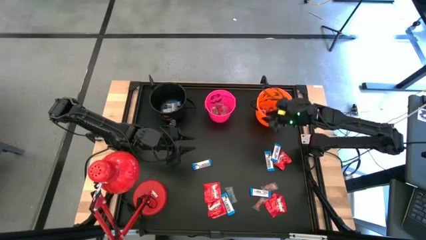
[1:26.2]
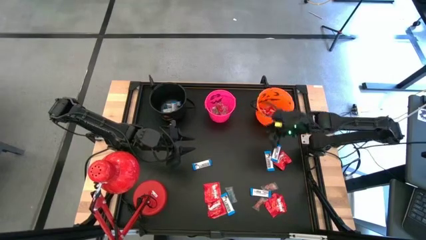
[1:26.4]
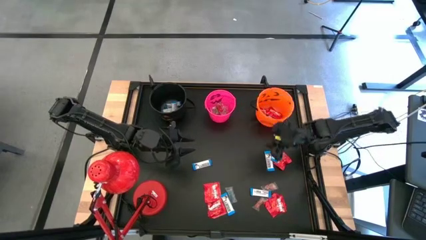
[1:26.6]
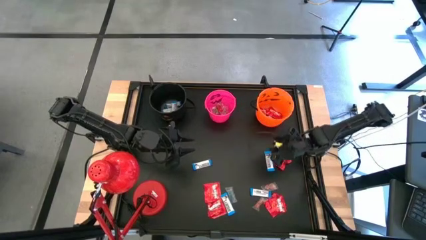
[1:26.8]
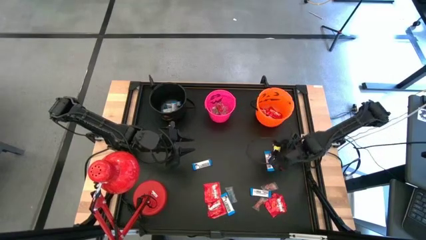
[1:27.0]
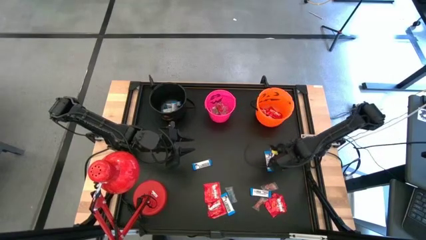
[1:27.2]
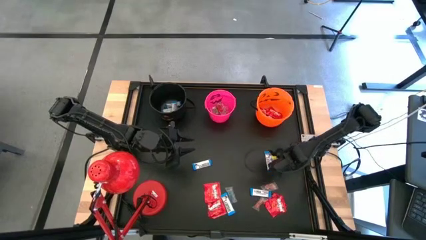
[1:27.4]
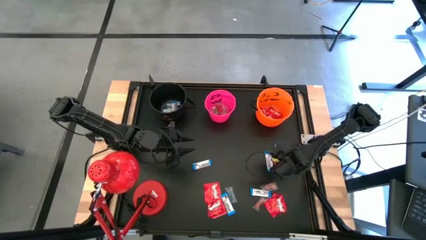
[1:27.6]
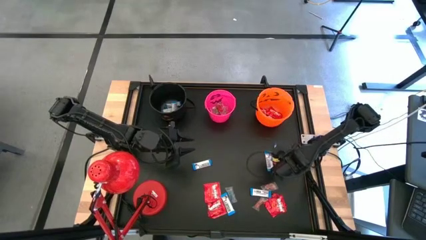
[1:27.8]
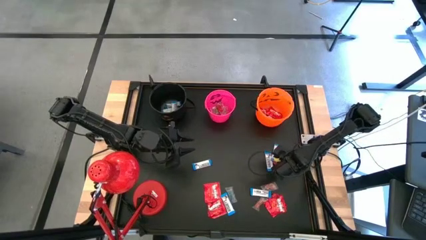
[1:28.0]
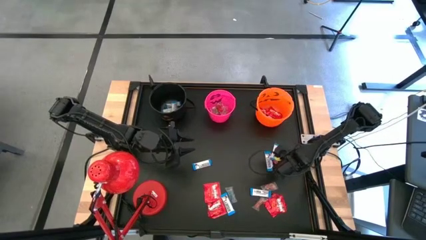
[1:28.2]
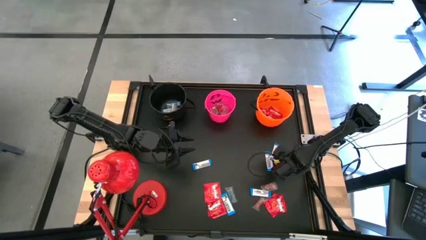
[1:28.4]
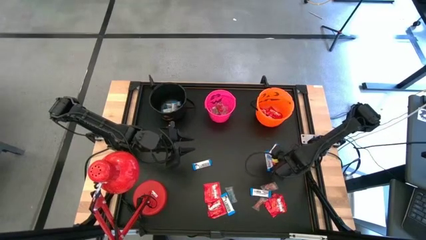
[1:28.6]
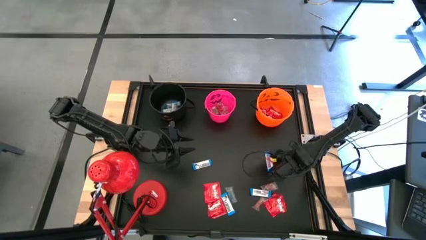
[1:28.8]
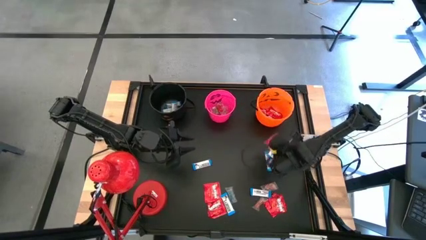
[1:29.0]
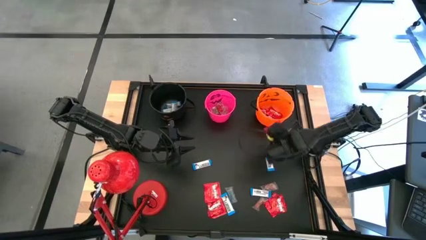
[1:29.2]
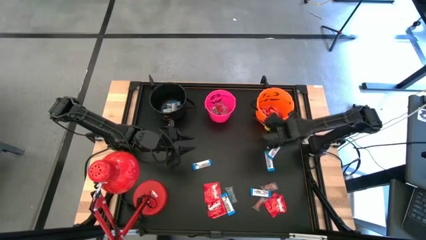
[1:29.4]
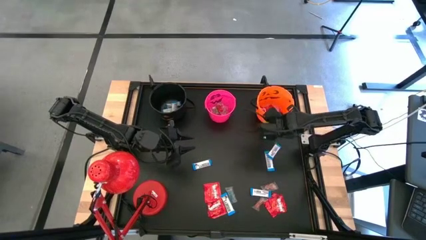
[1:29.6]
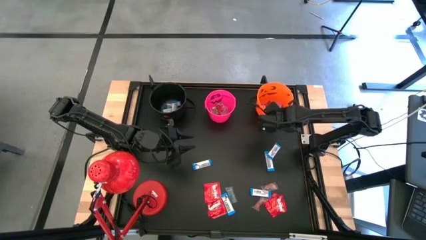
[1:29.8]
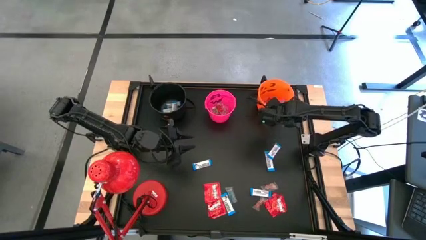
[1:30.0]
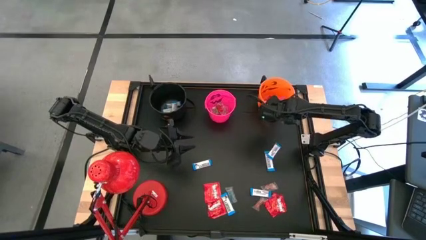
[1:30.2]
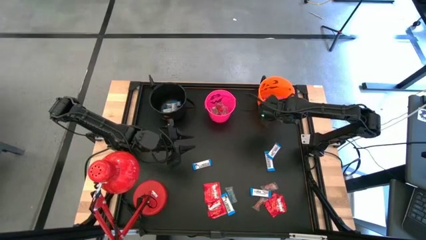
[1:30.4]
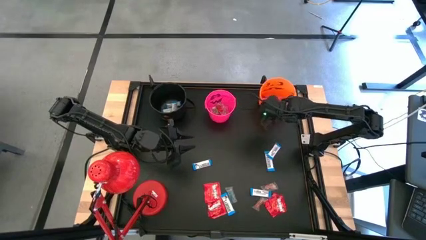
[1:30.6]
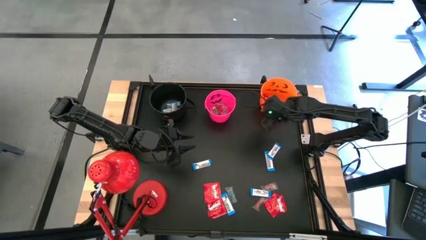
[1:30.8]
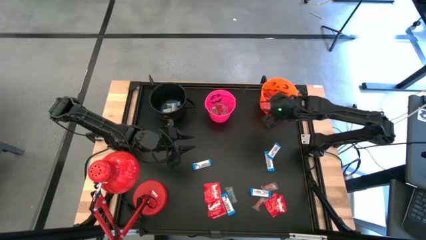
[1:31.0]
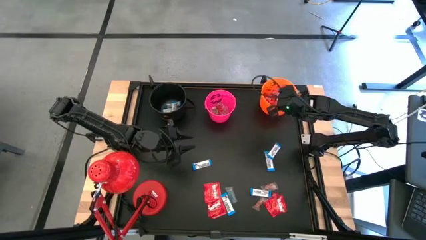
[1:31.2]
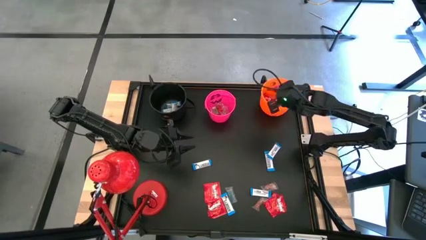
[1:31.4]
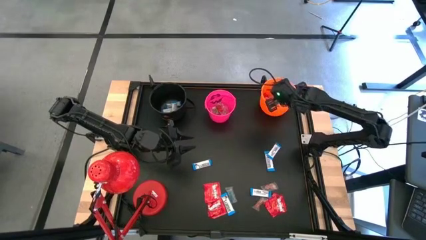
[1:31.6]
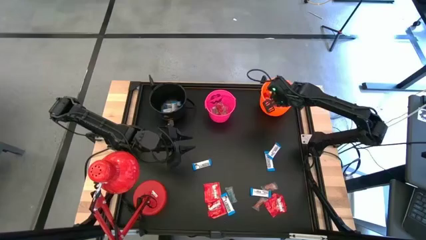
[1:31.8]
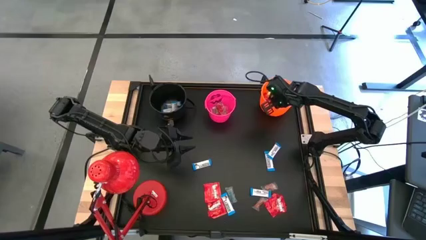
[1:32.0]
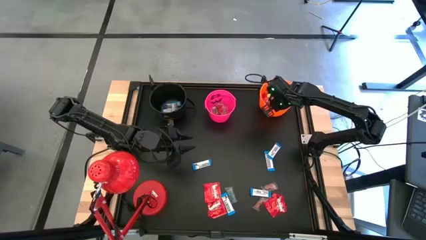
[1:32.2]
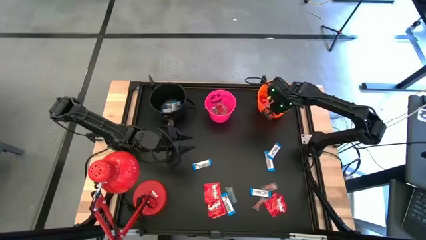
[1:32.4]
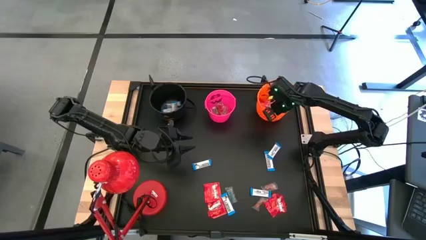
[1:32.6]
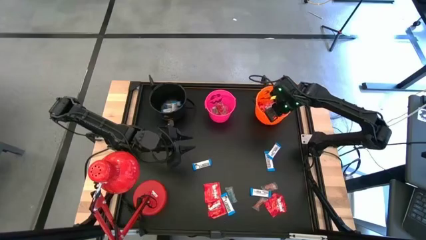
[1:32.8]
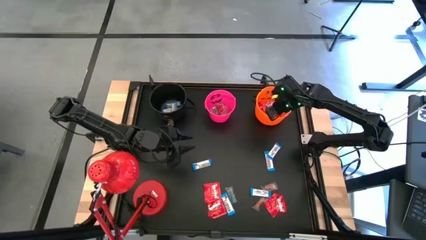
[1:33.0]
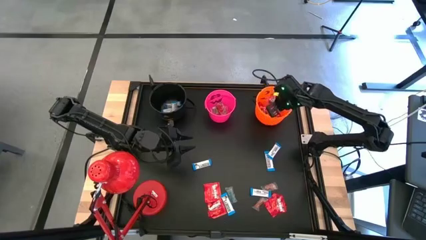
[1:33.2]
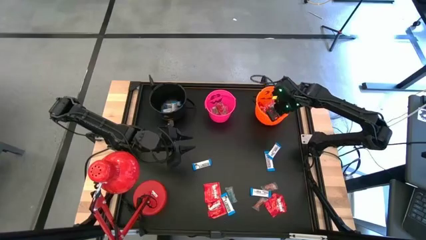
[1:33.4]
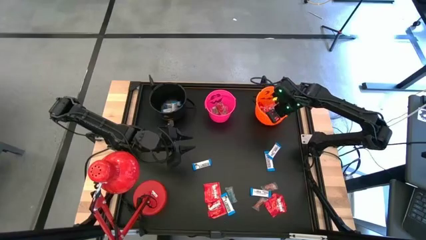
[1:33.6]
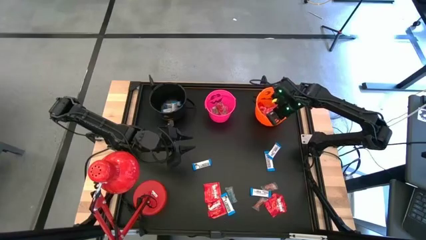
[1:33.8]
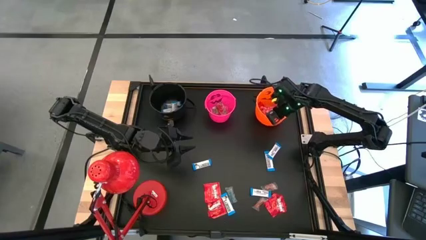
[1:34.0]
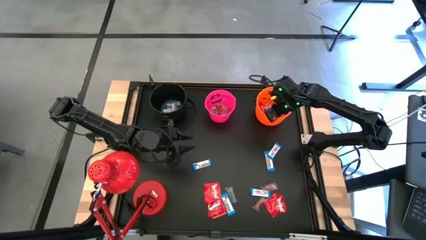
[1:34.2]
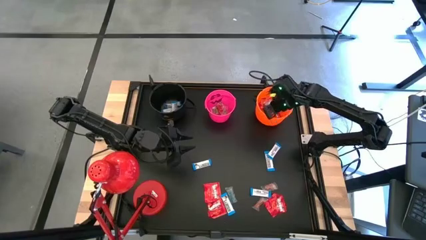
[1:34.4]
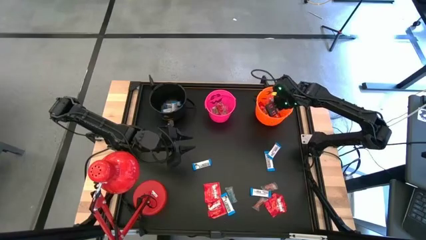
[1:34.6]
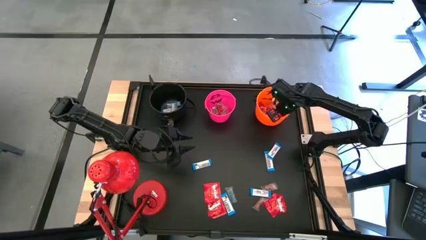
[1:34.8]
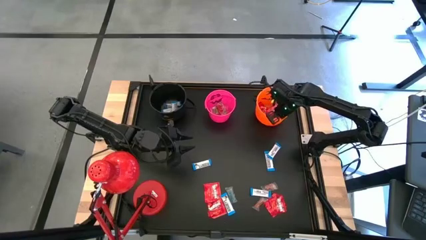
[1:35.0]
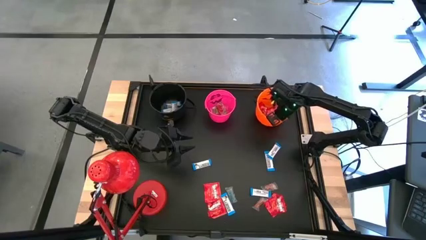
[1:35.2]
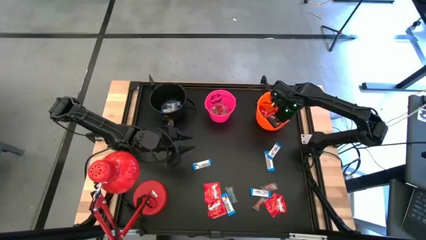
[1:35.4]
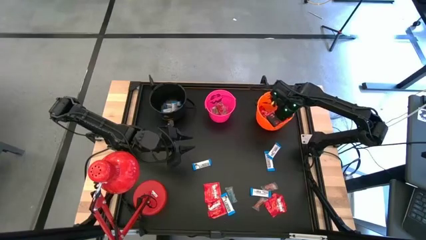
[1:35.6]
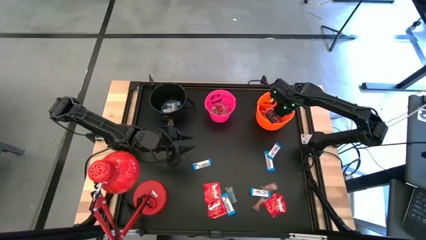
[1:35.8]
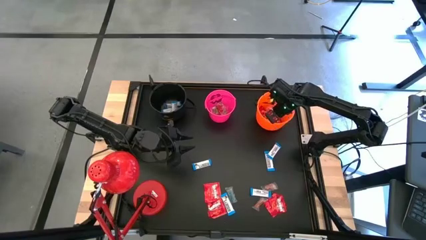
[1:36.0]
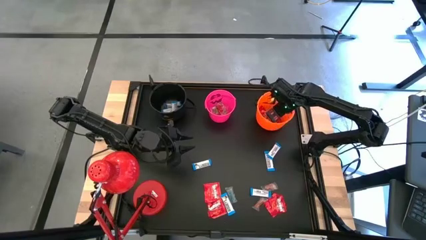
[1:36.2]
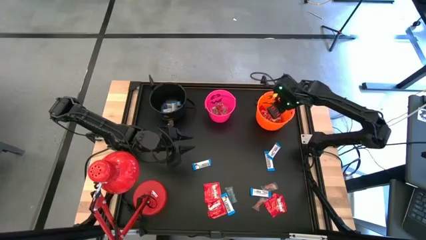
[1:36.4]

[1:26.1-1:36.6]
Task: Organize candy in baskets
Put the red candy into the orange bucket

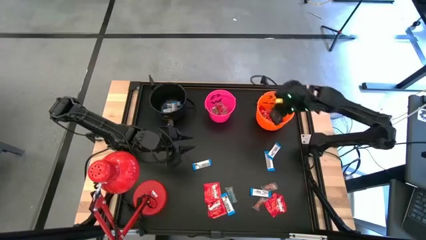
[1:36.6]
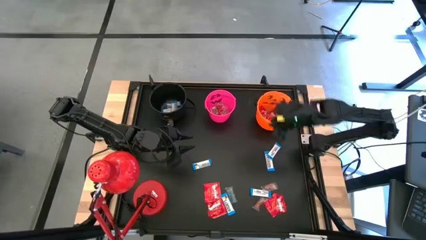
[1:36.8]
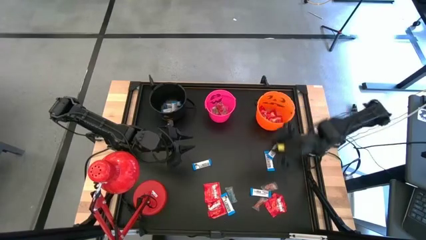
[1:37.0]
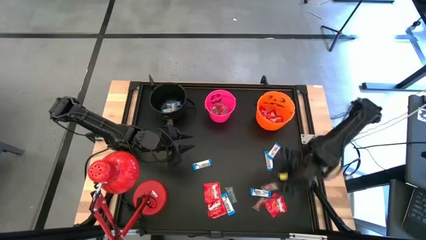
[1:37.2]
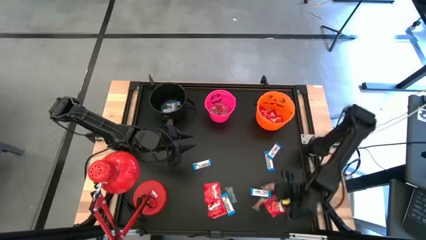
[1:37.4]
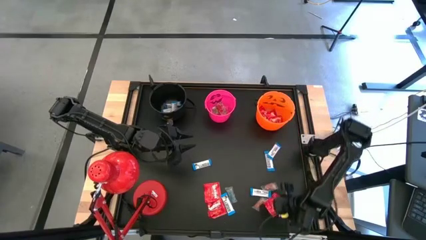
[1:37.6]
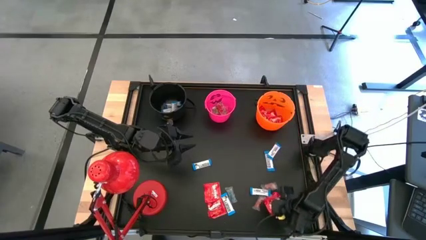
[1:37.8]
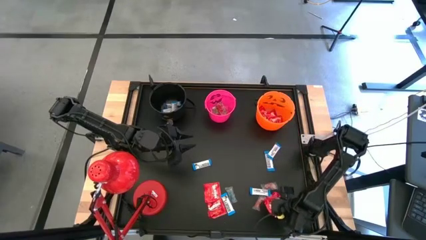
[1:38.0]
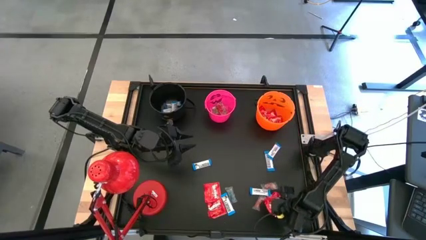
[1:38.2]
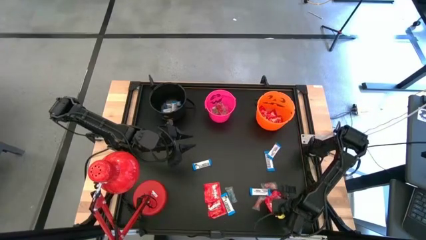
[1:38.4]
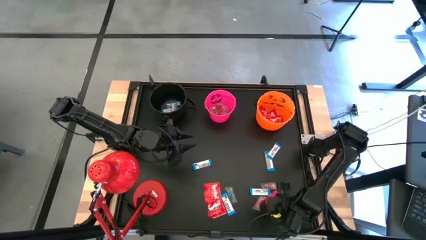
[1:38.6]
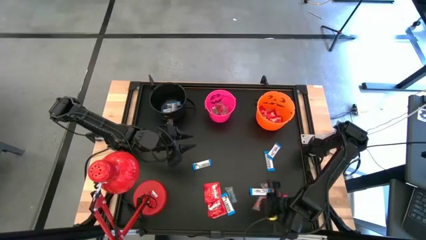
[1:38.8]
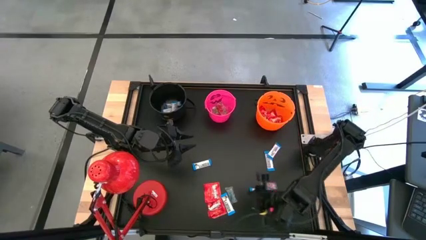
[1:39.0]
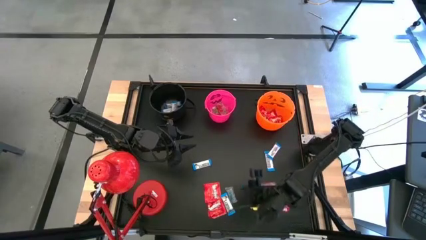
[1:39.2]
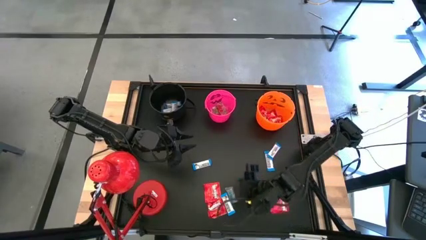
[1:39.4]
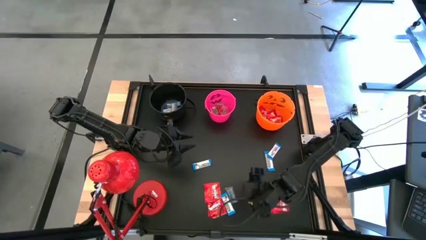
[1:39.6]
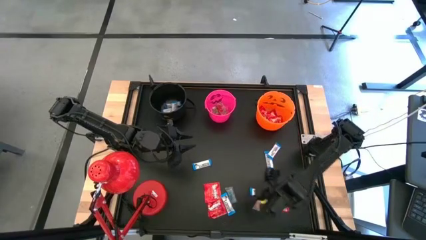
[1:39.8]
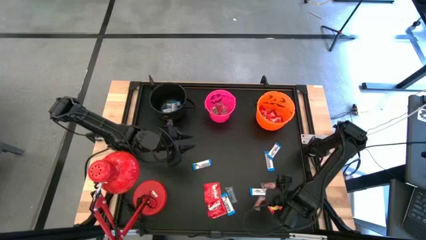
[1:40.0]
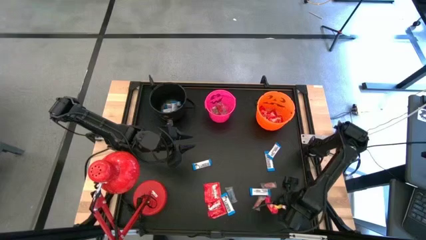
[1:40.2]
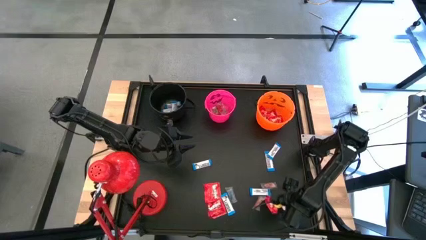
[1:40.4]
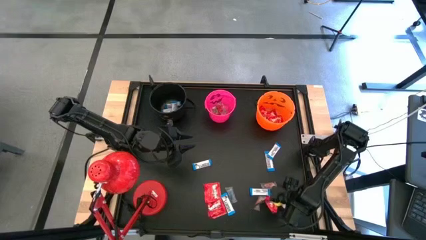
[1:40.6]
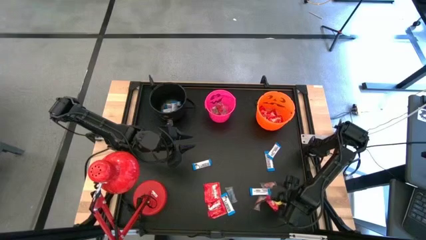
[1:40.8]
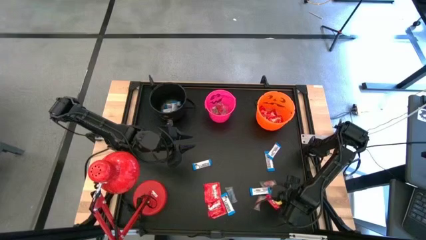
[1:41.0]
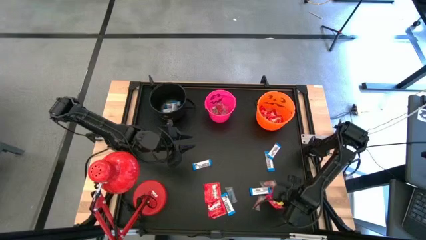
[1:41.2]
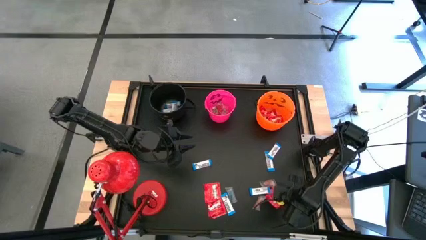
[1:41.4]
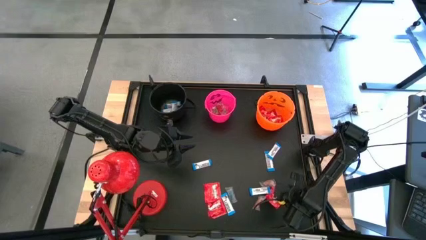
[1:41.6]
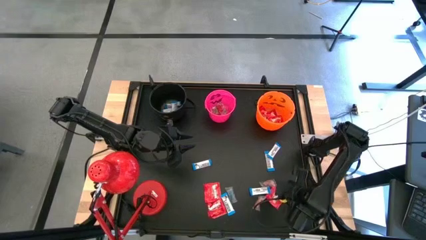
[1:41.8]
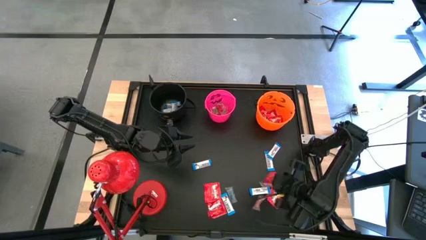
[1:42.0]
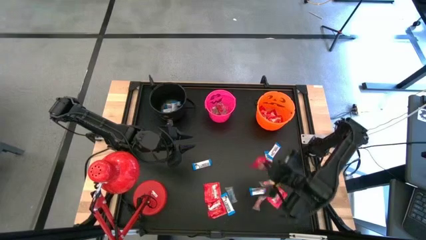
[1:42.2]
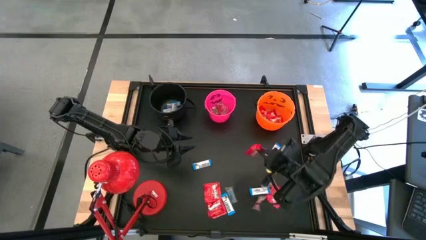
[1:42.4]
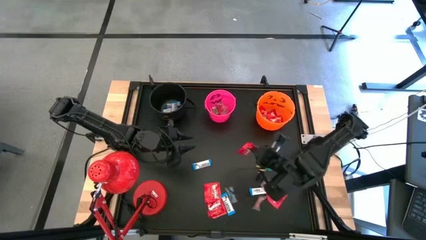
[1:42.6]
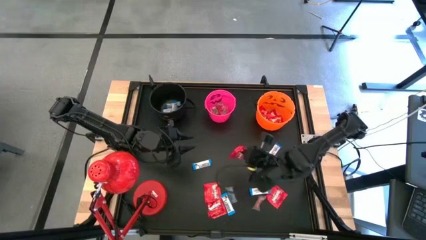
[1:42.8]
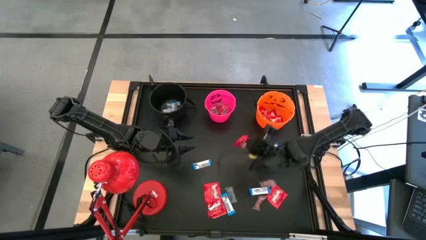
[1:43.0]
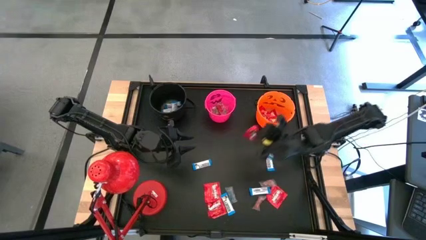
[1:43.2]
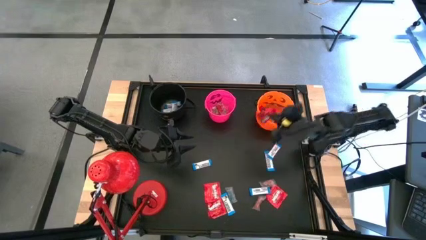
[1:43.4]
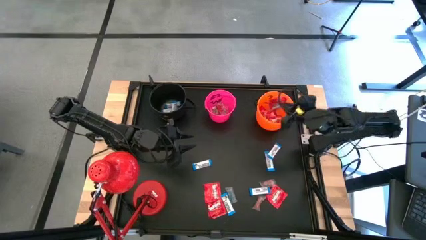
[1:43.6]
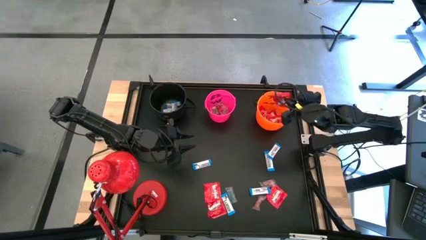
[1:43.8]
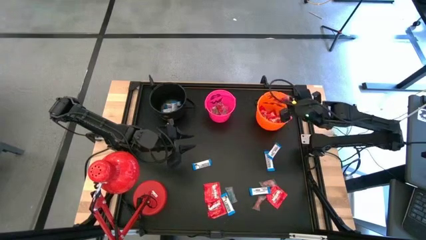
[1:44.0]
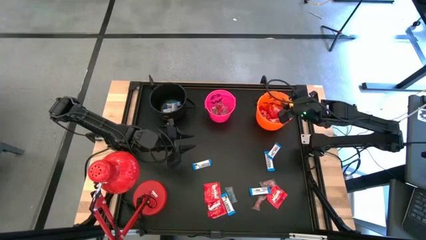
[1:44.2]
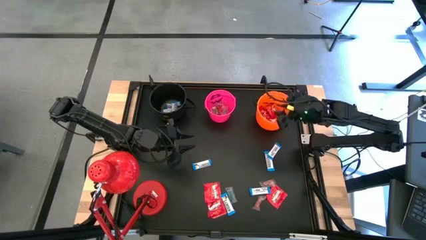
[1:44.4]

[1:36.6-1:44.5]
Put the red candy into the orange bucket
